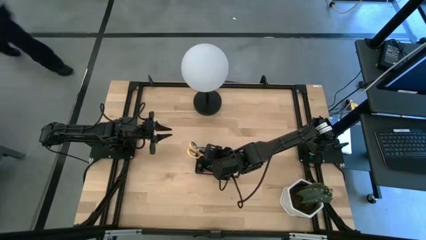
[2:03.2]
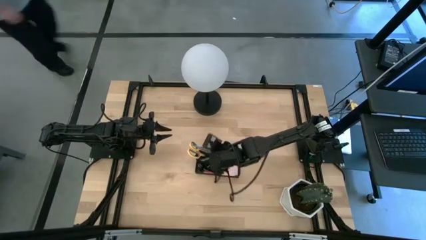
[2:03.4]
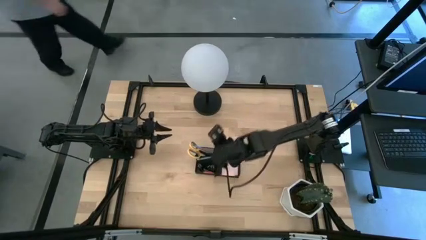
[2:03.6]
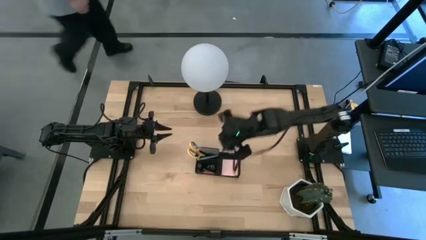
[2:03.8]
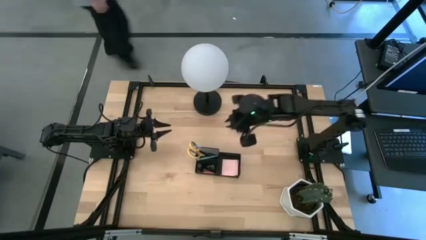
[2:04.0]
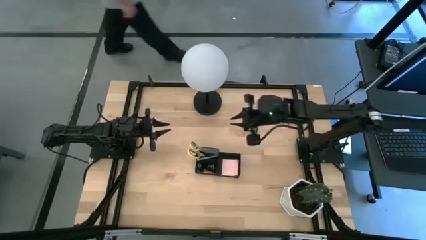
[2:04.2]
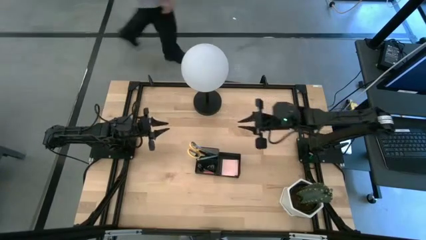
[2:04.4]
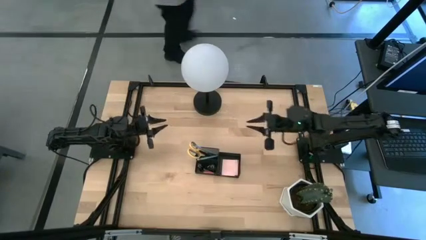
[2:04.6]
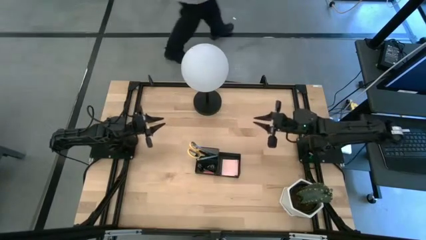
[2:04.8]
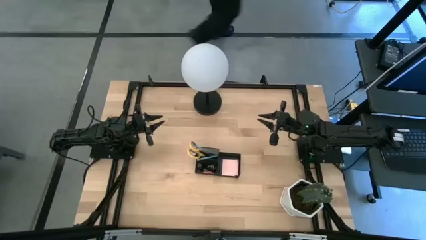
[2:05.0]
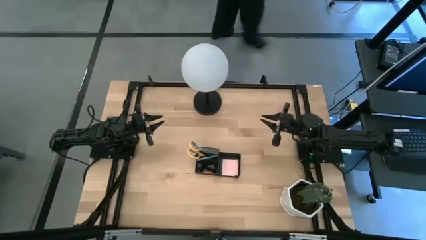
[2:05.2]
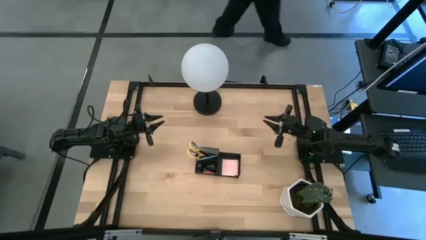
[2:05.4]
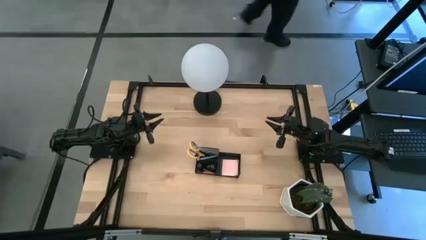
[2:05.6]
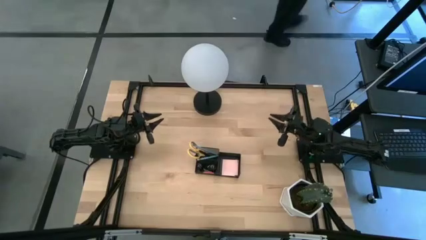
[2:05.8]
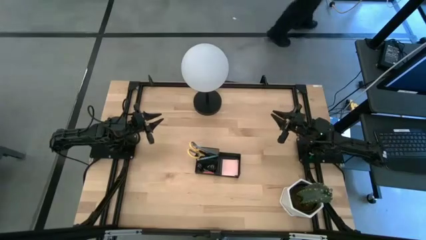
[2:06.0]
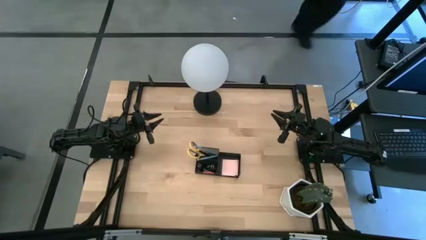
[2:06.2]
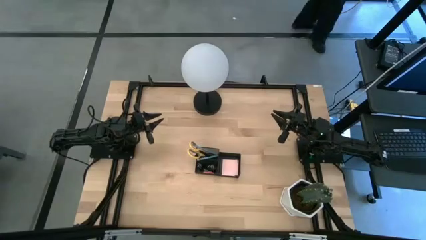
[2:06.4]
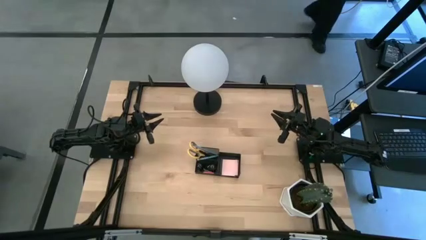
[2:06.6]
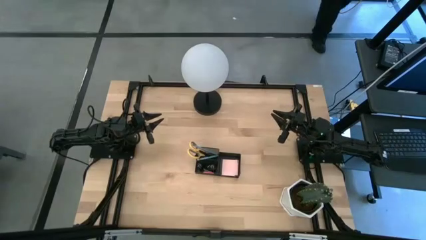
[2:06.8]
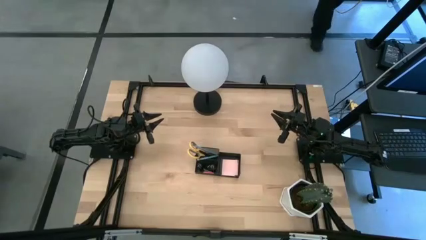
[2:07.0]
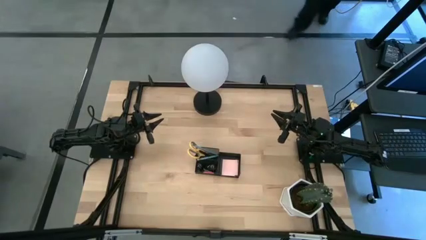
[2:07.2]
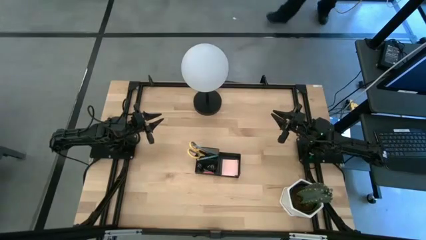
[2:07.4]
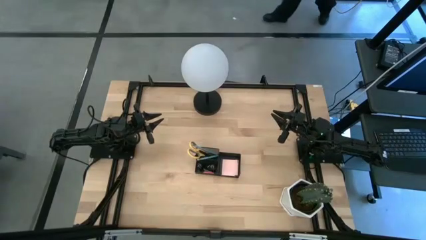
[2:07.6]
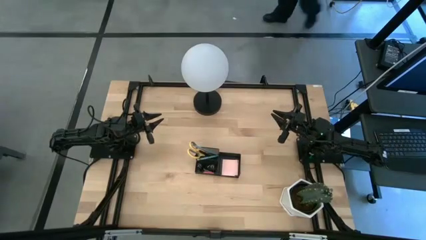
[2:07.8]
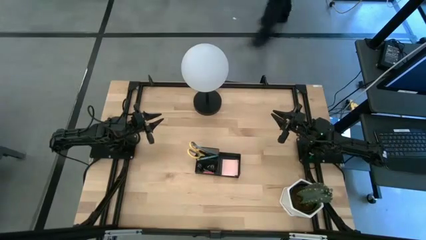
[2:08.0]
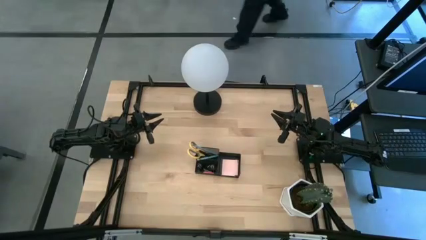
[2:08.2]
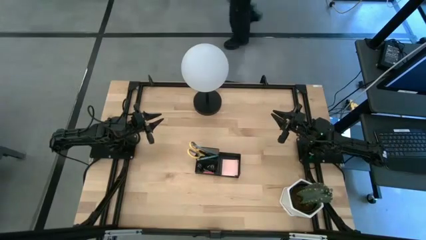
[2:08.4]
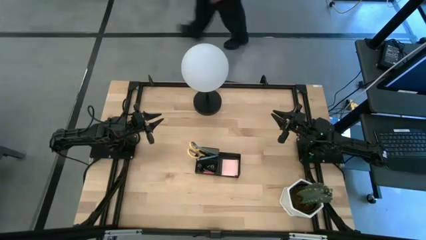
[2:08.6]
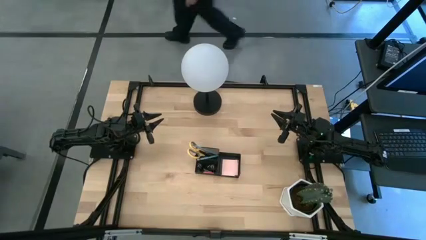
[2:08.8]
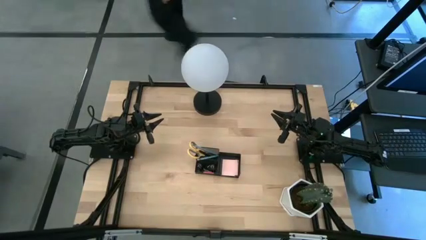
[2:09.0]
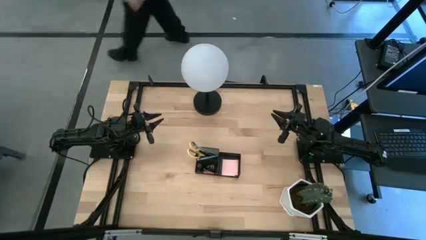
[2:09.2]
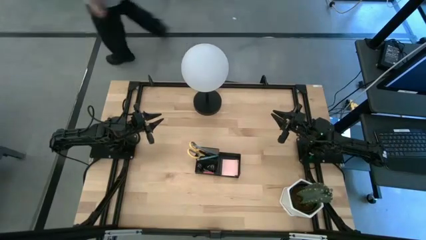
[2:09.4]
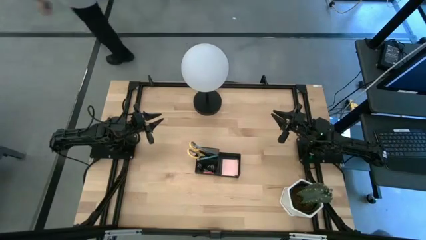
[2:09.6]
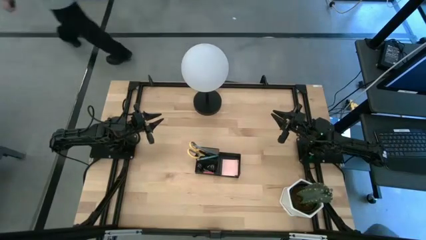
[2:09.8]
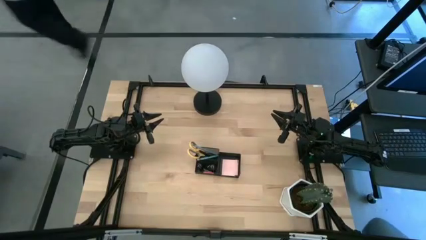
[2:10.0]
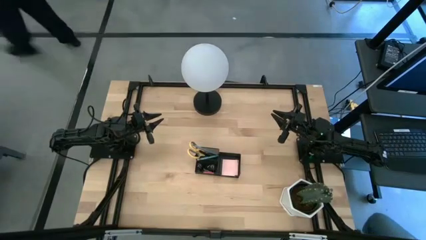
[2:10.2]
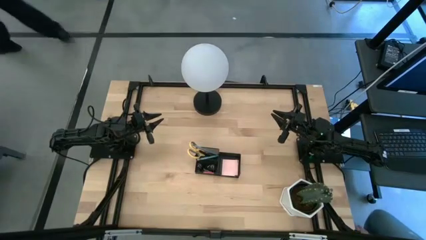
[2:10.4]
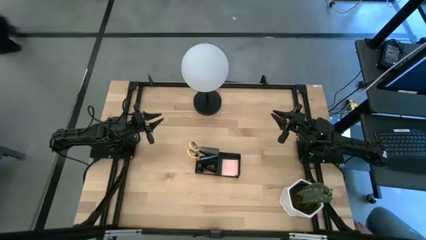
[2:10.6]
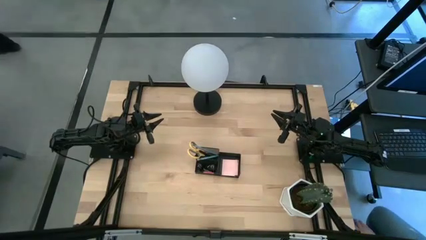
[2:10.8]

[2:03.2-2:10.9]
Task: Pick and place office supplies into organizer
Return to Home Position

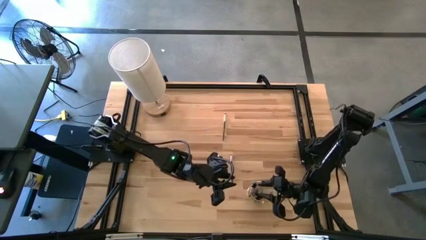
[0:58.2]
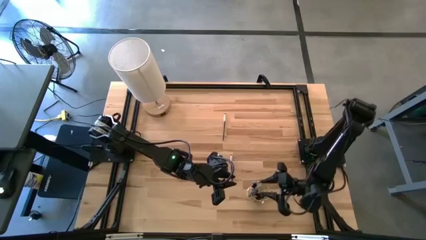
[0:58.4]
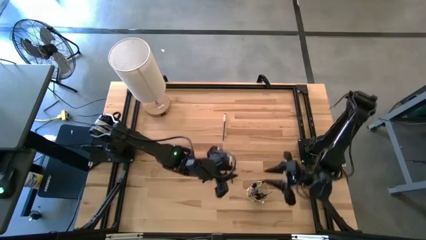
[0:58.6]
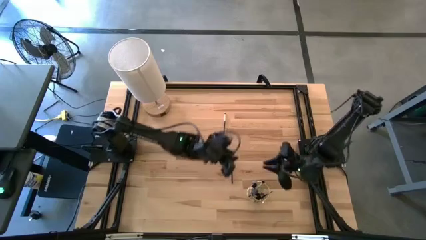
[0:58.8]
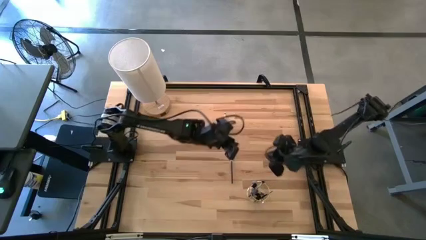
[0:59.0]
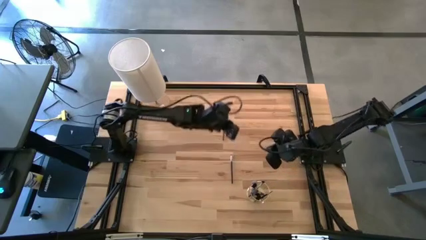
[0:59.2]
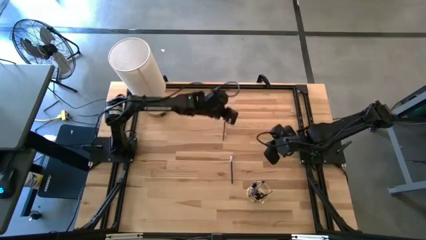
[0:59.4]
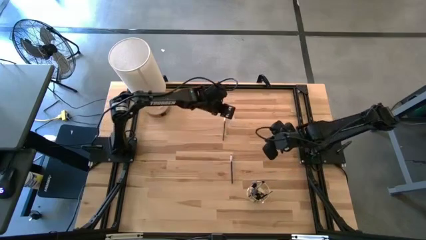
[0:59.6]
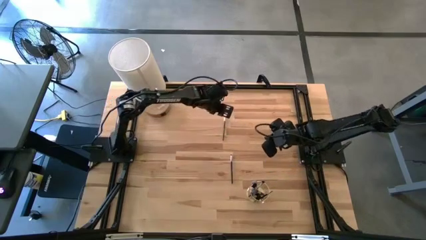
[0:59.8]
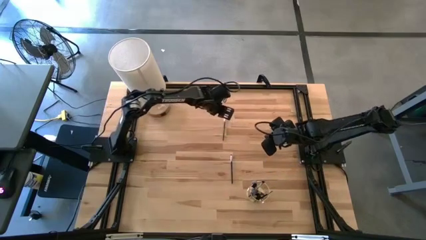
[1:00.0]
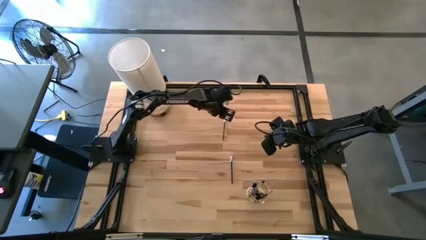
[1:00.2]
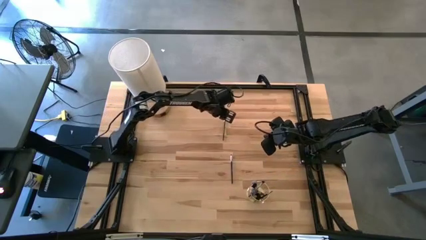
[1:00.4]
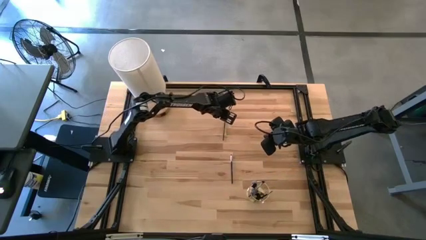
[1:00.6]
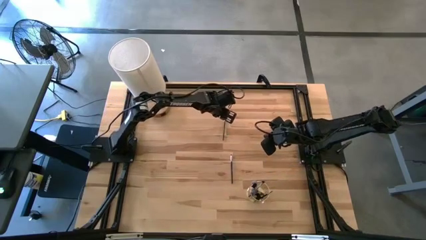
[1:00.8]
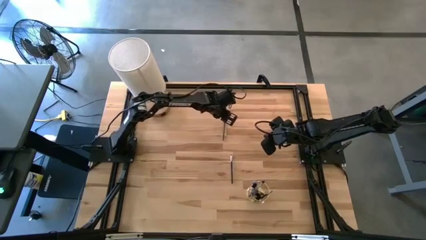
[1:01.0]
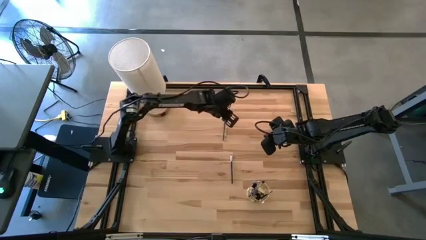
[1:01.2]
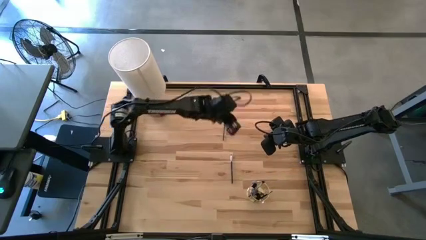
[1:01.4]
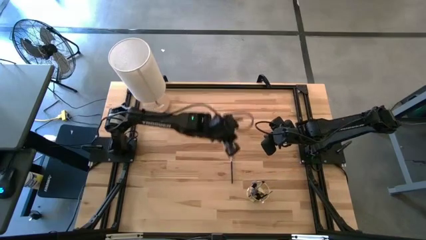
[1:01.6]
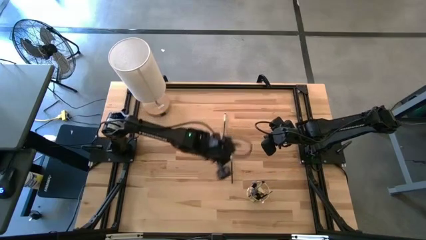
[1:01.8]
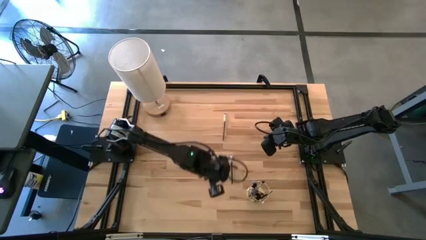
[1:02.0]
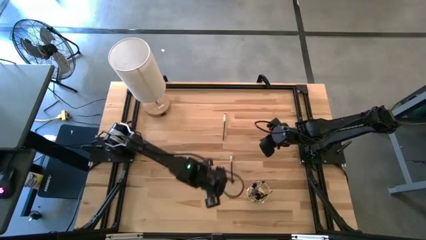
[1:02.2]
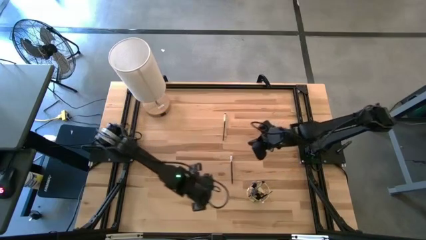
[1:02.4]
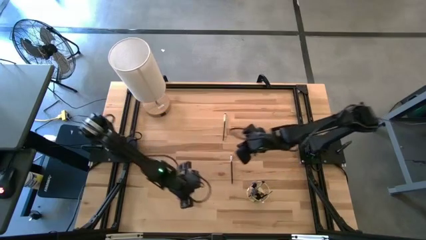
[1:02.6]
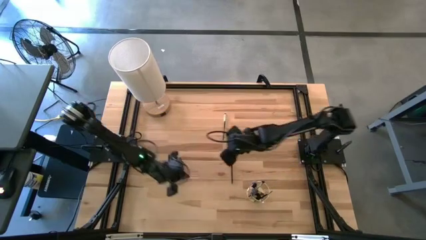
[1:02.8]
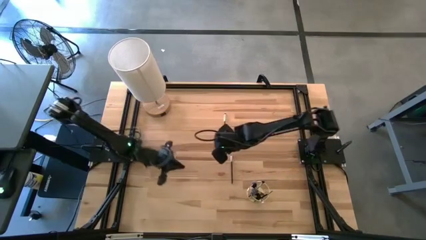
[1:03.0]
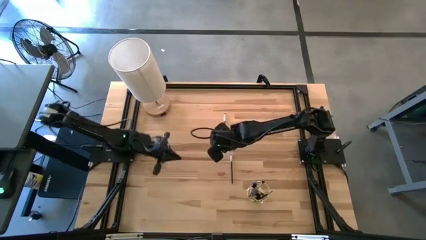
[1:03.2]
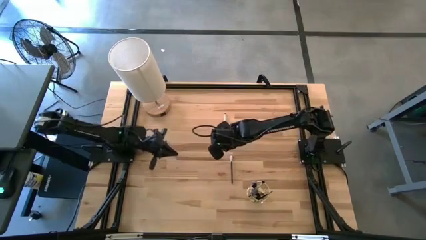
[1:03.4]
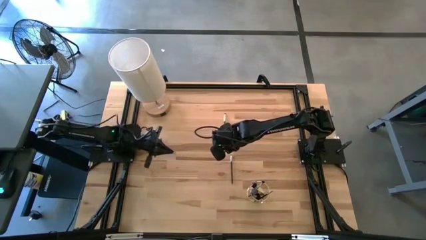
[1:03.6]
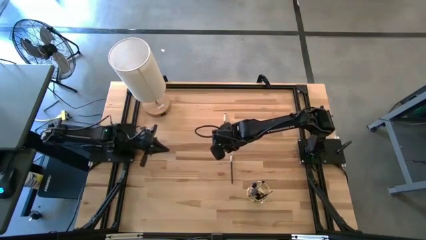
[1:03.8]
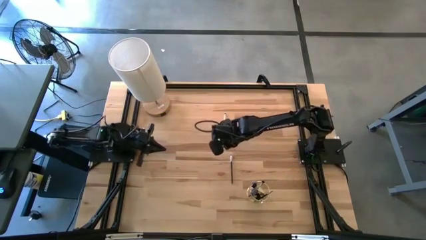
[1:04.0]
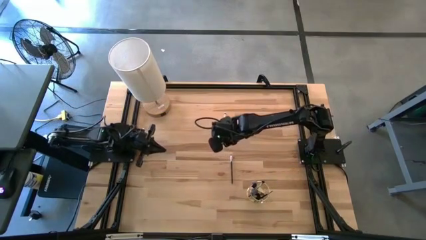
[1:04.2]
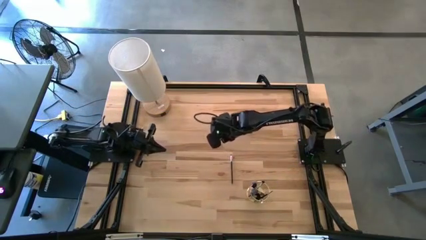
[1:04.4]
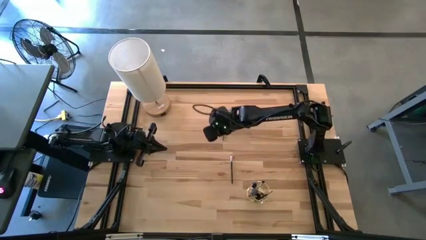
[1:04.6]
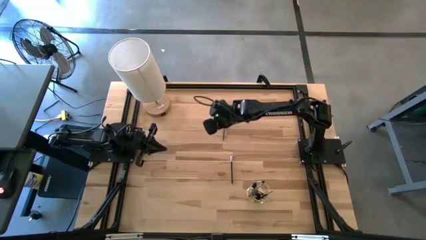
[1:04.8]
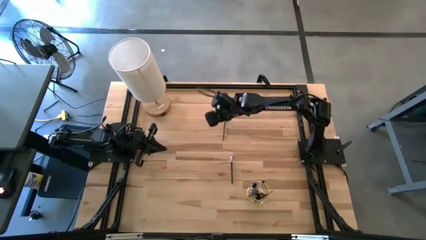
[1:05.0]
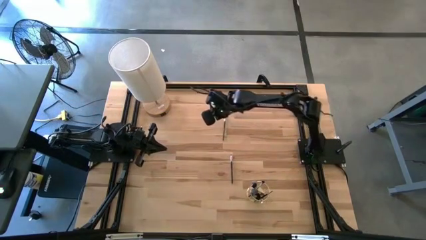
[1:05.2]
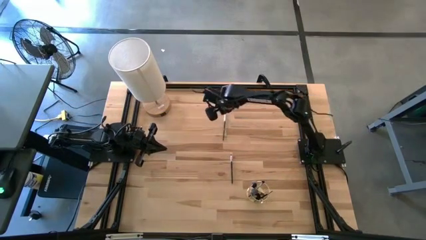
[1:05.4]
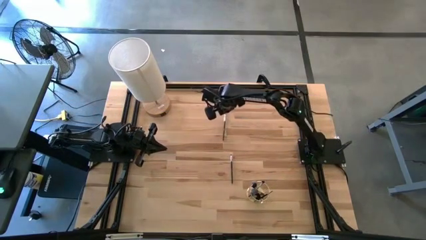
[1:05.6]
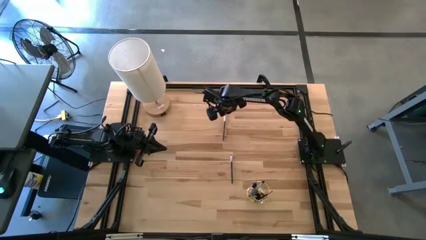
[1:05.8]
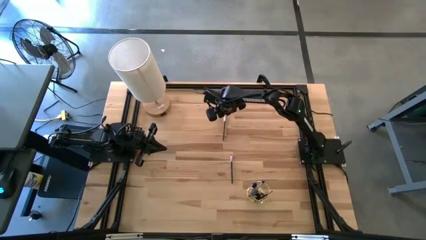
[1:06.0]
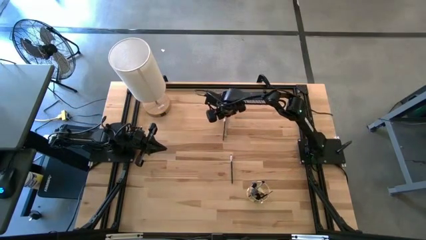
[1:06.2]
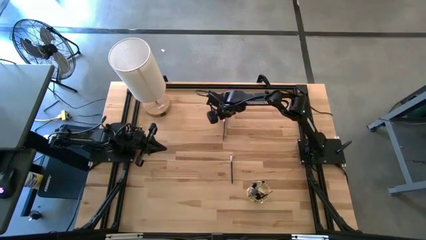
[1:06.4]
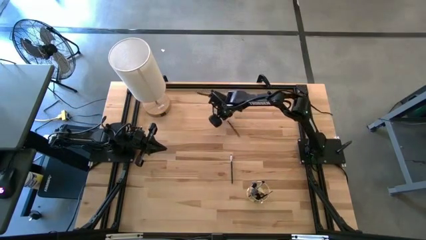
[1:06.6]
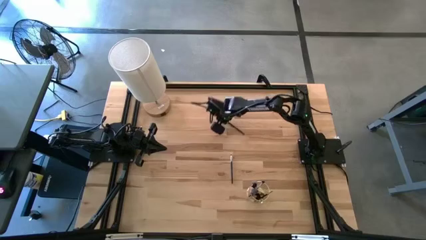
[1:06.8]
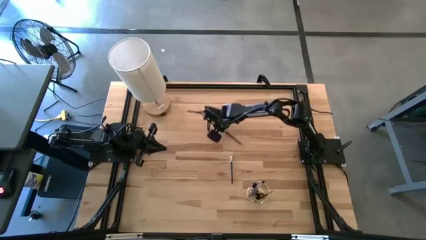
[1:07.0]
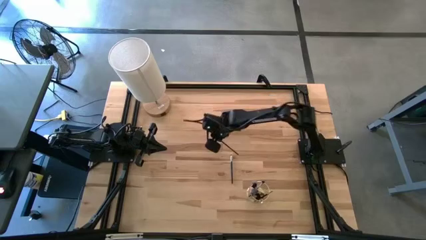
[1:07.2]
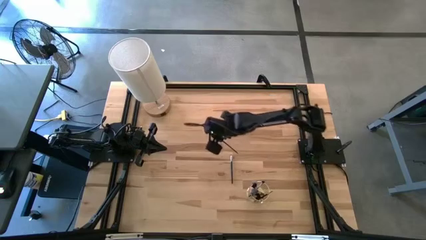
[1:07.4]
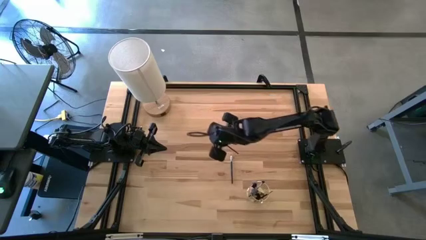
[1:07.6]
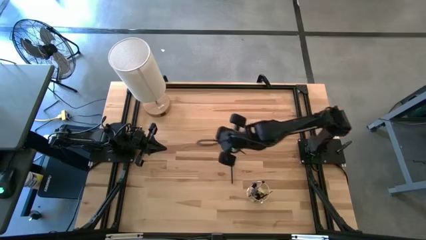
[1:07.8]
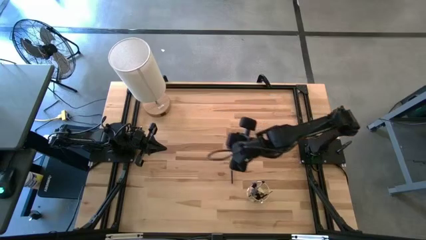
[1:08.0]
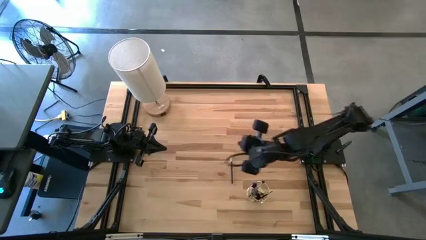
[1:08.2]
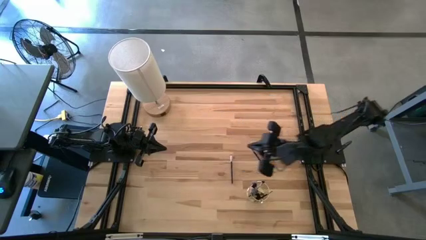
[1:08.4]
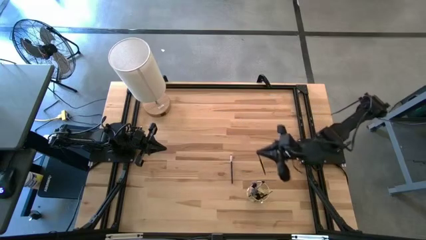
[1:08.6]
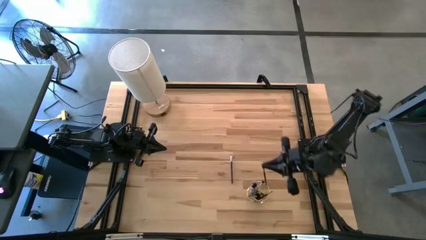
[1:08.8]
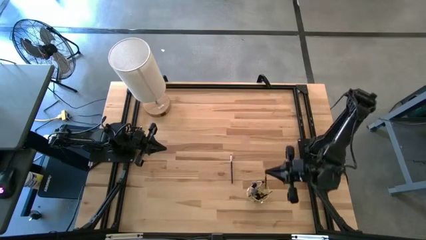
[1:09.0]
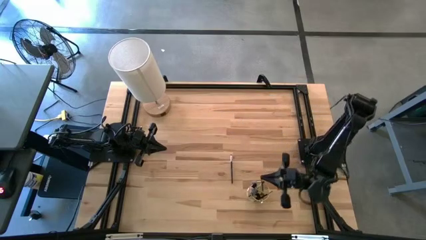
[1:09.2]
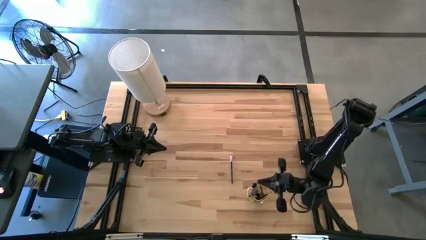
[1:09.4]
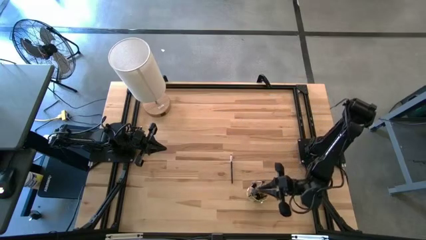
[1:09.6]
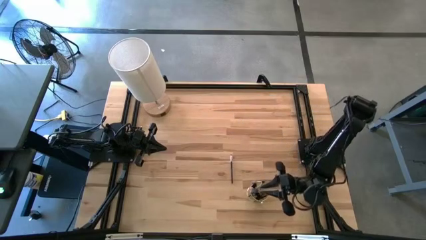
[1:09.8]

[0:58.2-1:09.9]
Task: Pick & Place Makeup Brushes
Put the eyeshadow brush into the makeup holder
